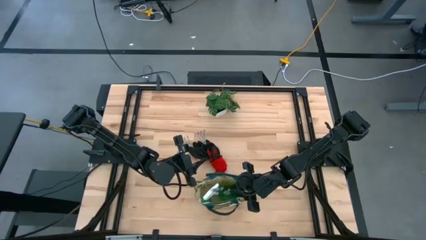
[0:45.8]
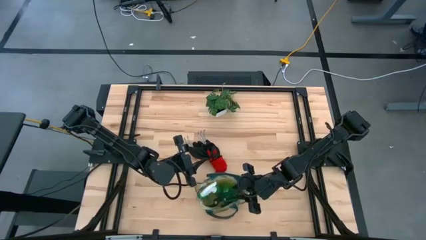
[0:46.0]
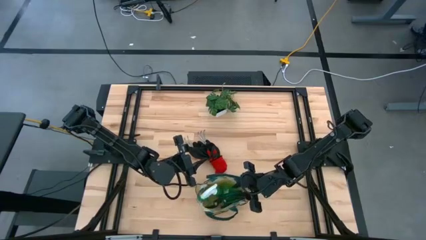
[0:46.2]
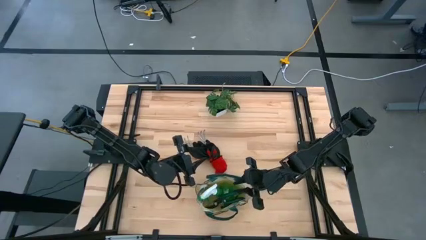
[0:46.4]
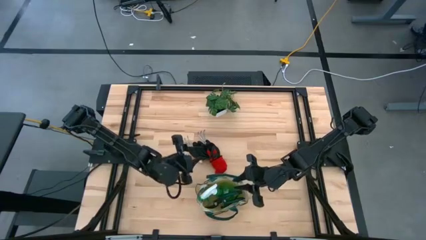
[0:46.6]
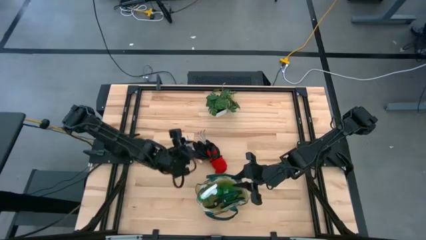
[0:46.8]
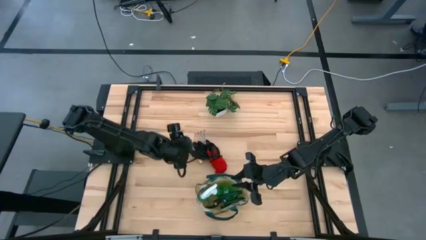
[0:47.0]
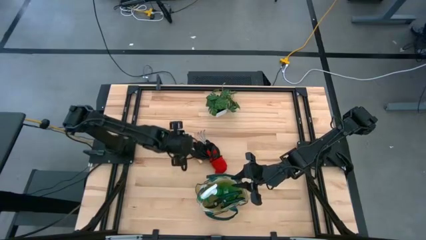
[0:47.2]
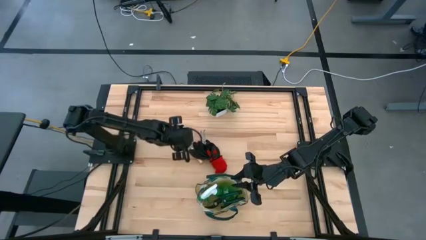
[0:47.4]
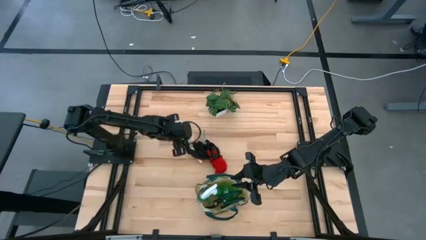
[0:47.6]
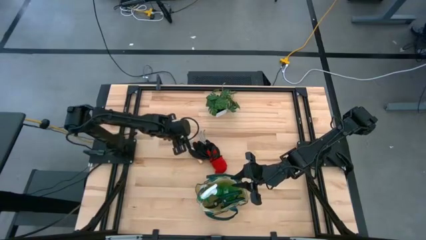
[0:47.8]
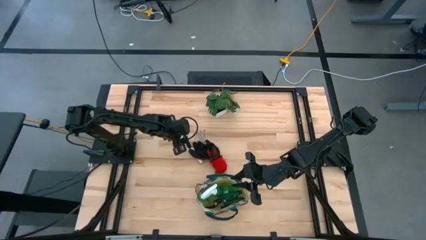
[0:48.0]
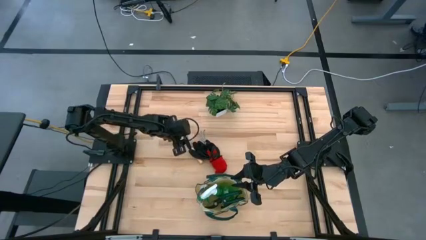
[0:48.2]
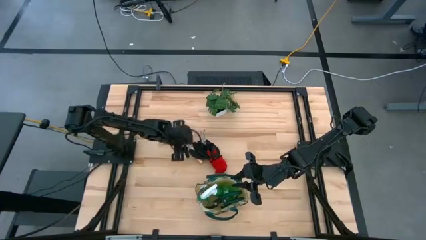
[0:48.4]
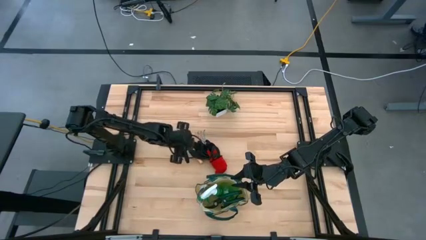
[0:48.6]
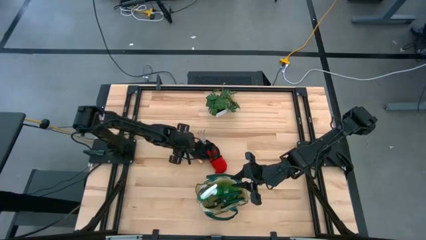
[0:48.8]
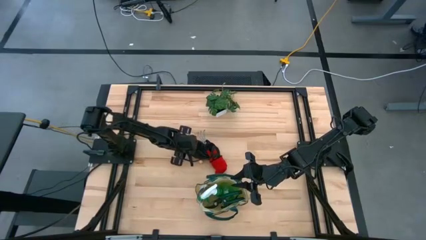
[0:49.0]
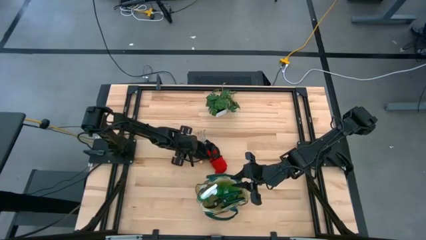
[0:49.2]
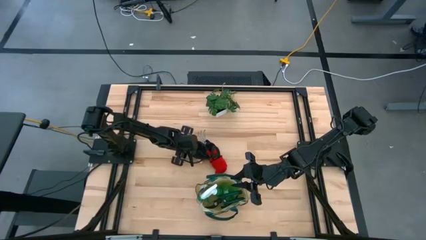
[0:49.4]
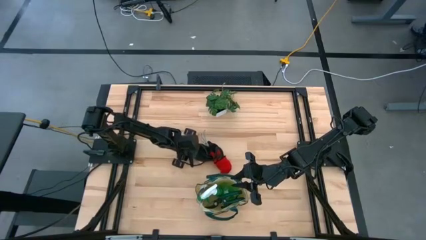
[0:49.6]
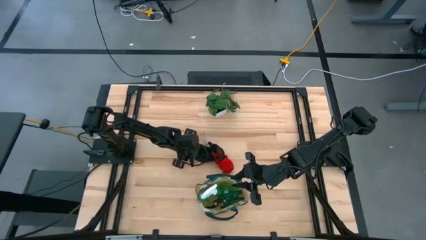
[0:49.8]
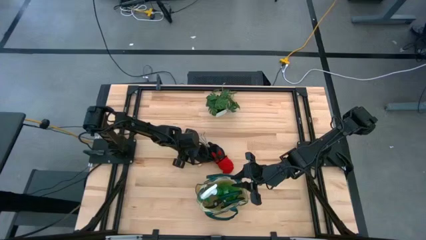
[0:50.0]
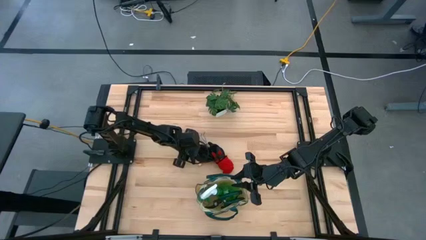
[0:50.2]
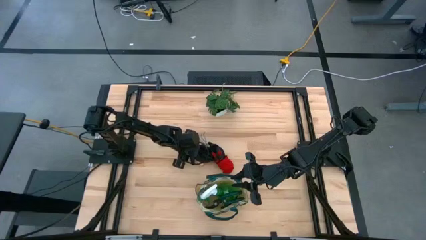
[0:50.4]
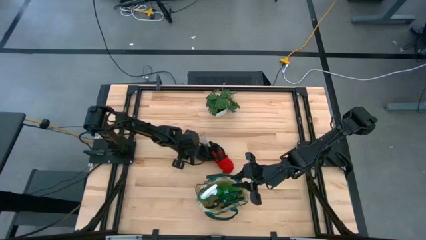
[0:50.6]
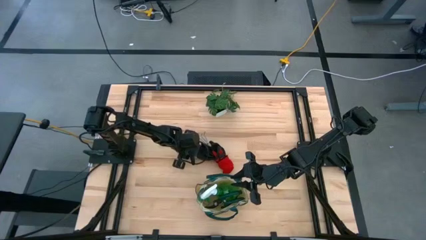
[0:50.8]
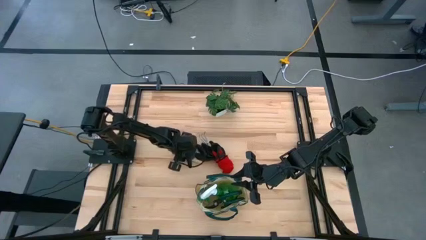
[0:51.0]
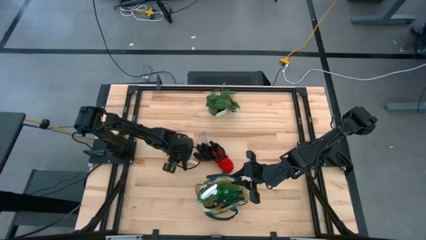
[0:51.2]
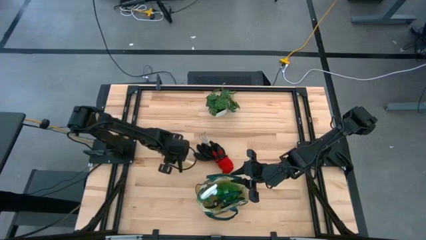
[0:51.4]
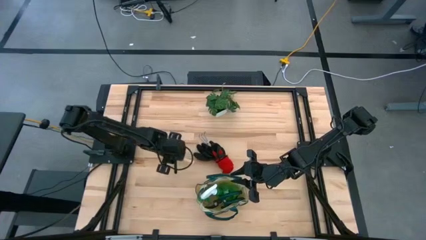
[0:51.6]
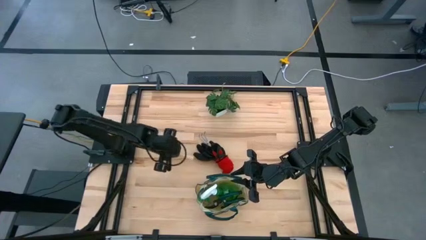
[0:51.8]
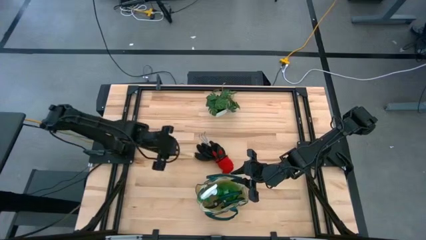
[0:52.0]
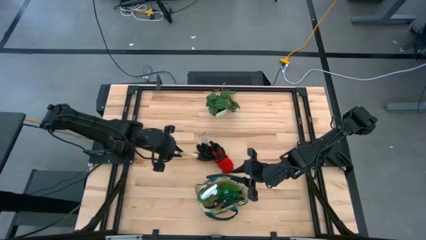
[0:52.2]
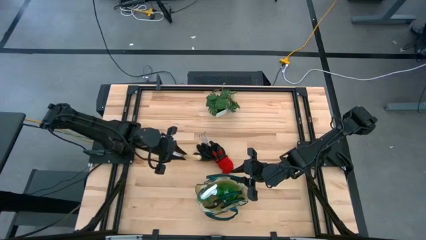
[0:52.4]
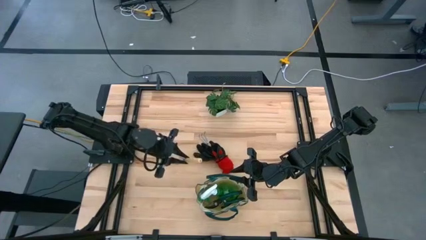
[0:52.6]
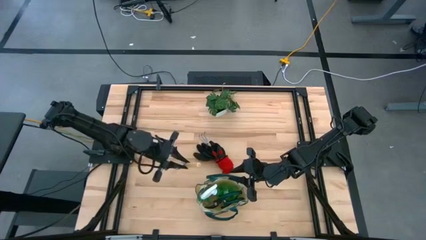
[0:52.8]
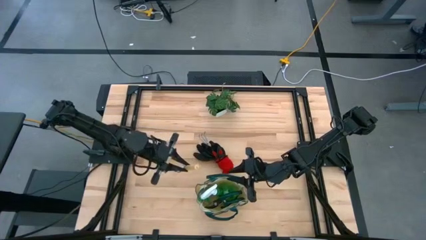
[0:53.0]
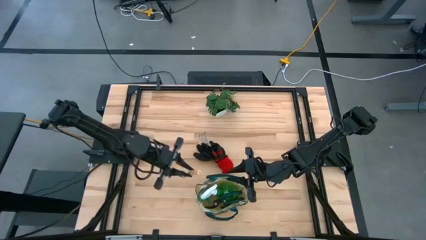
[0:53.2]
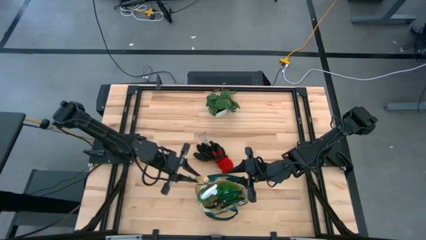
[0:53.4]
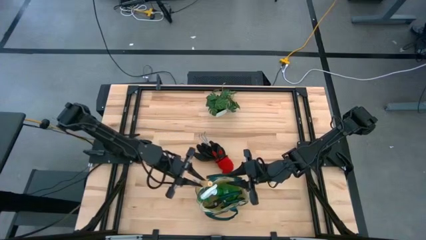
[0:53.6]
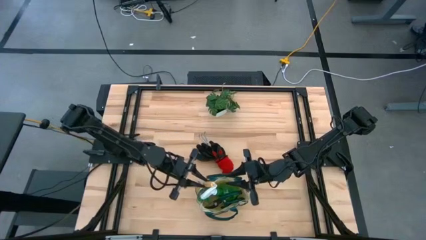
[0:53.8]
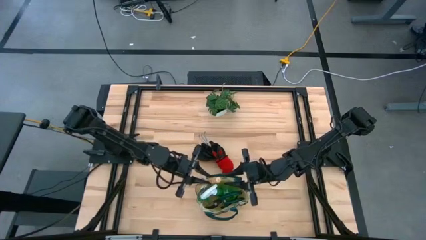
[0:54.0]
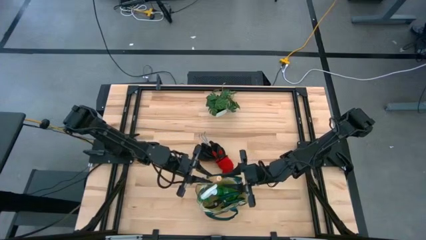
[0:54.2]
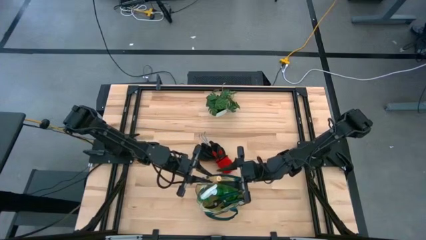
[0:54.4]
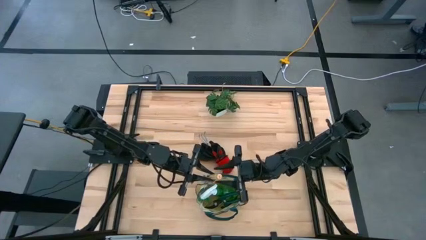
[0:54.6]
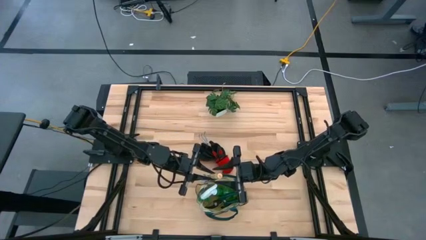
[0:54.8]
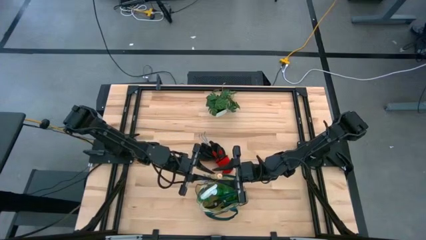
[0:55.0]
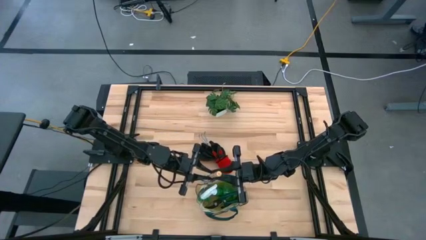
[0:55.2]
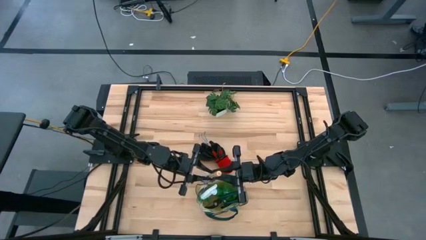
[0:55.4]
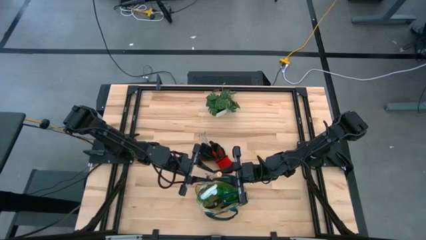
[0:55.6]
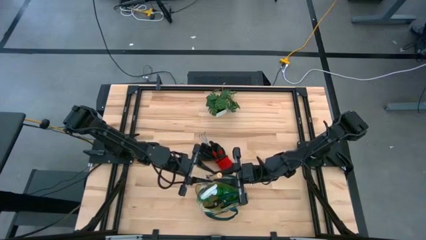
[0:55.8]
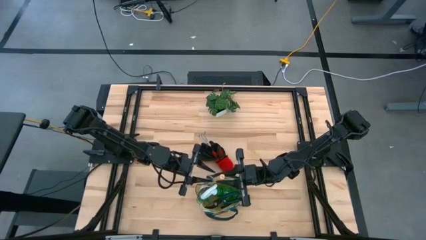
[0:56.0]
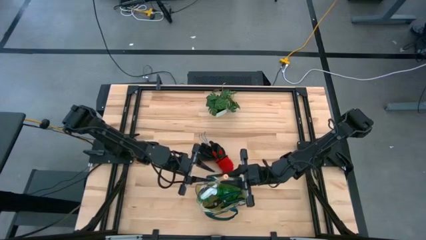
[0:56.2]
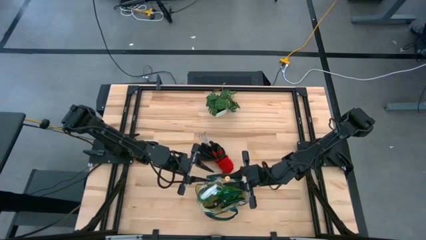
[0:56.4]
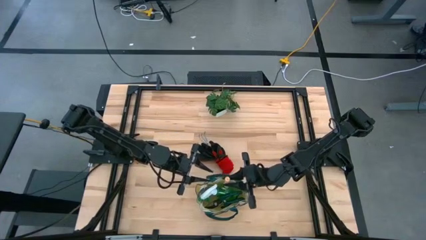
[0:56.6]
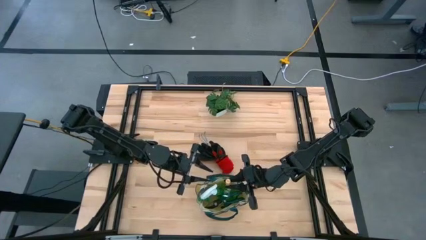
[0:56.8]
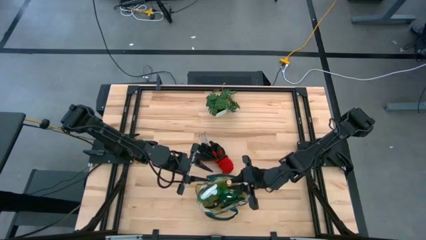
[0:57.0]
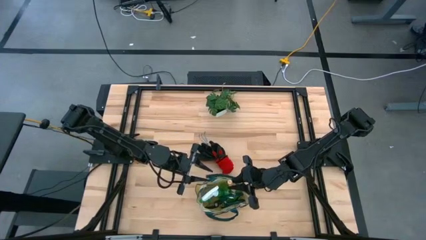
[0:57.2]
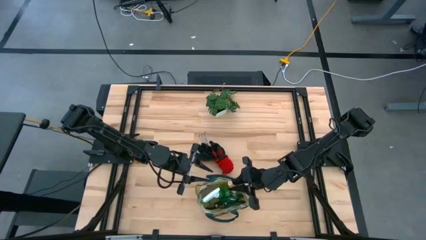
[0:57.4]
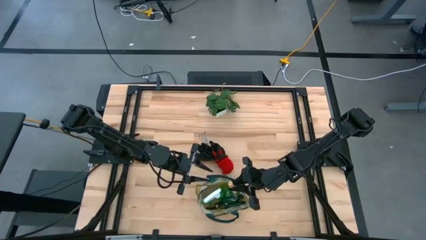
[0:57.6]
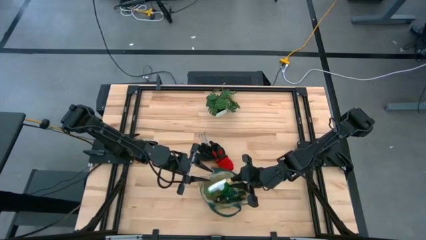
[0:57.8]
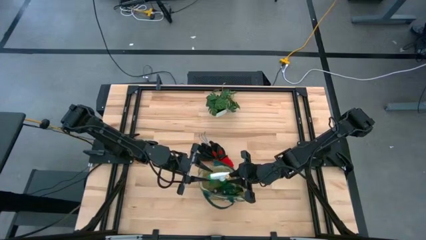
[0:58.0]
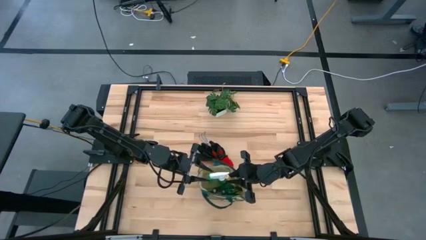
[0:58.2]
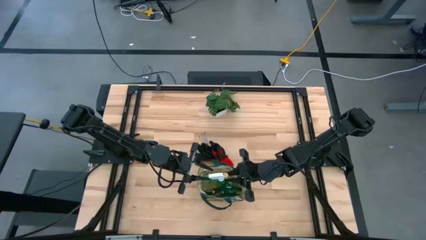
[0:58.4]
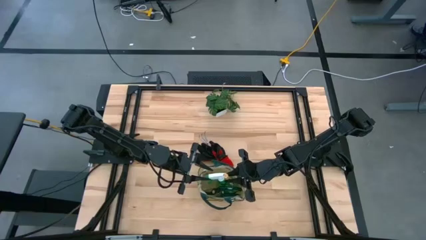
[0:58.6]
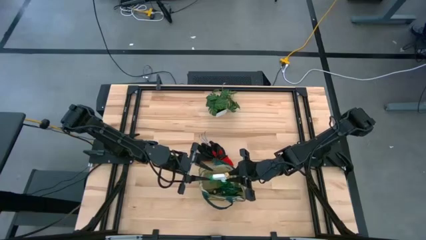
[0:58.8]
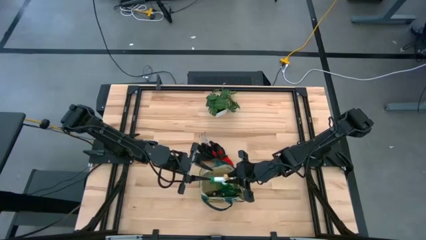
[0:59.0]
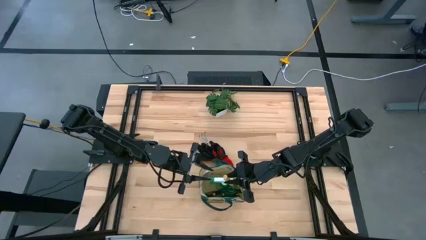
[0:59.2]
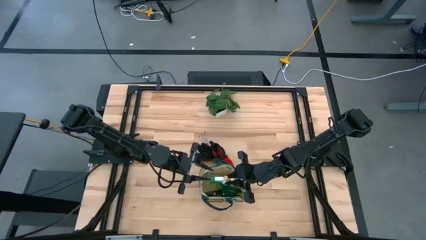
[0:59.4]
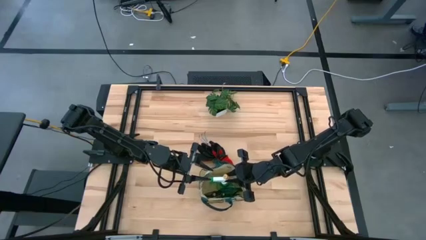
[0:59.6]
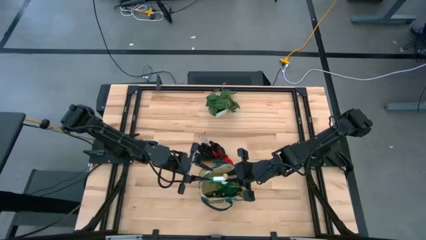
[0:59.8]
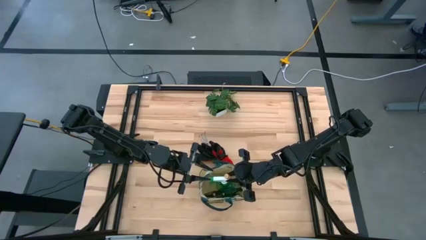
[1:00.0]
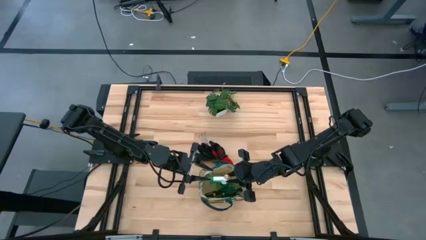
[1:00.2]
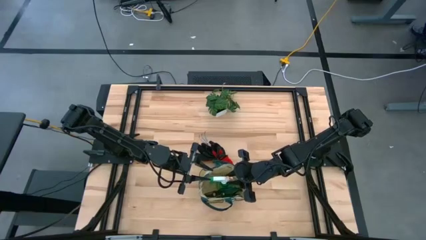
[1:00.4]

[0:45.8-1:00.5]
Task: Pick & Place Garden tools in Gardening bag
Put the left brown hand rake into the gray gardening bag

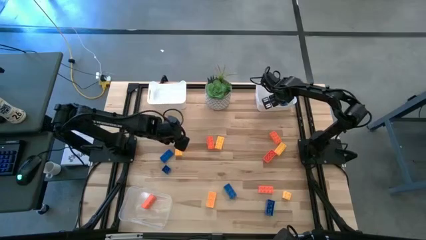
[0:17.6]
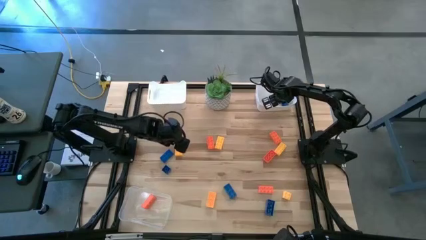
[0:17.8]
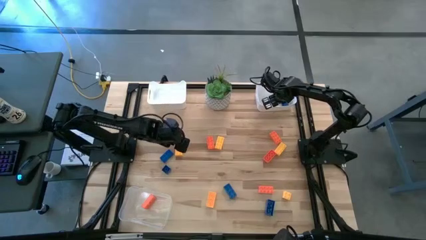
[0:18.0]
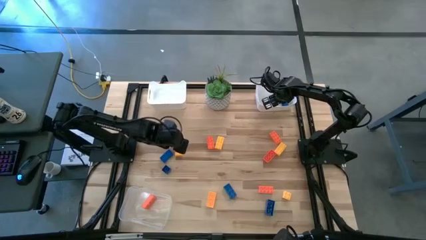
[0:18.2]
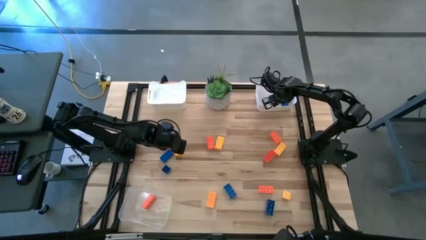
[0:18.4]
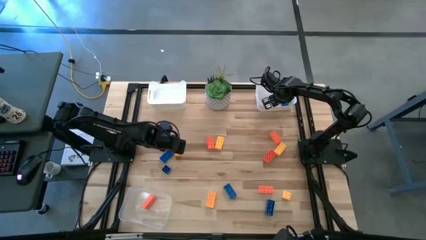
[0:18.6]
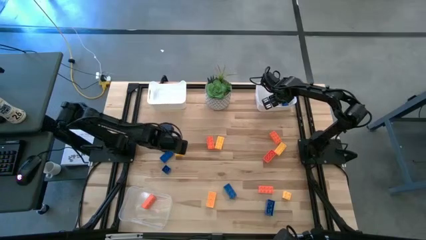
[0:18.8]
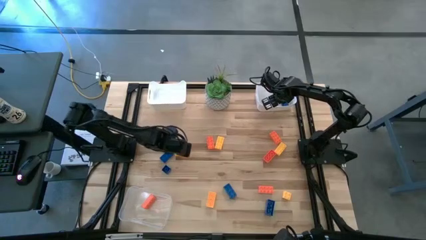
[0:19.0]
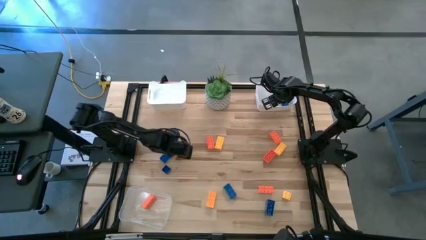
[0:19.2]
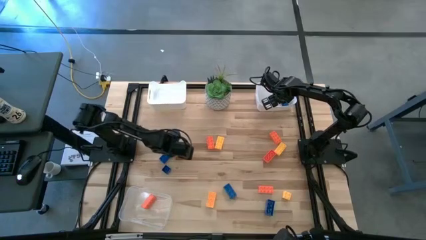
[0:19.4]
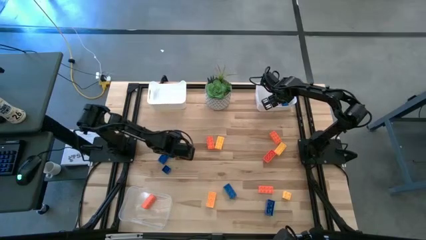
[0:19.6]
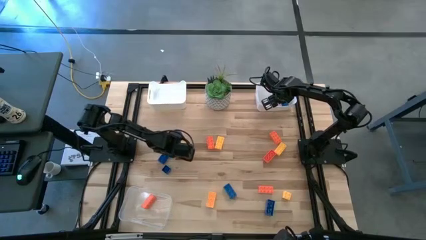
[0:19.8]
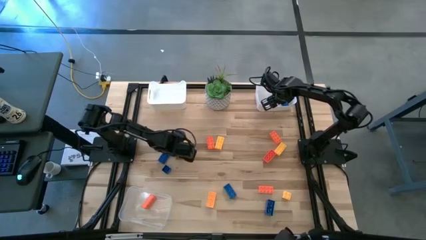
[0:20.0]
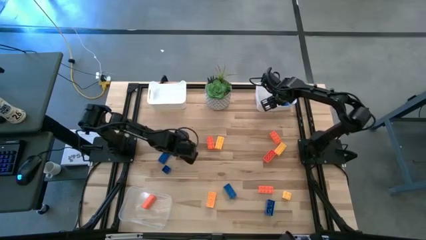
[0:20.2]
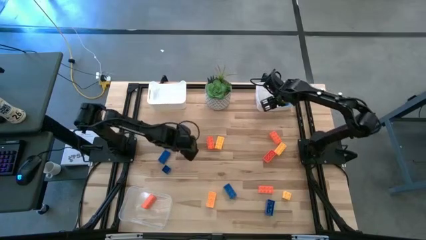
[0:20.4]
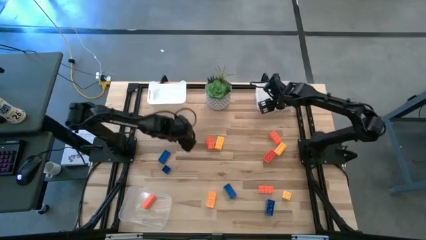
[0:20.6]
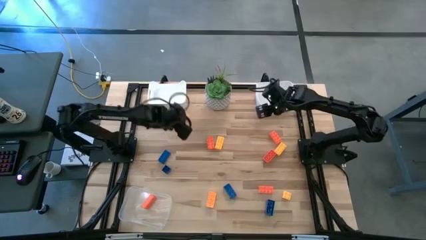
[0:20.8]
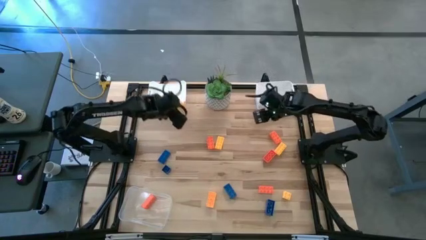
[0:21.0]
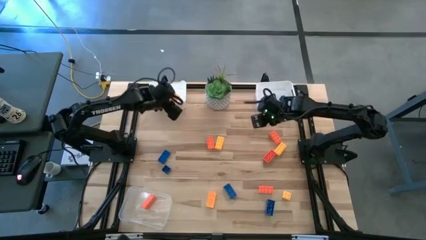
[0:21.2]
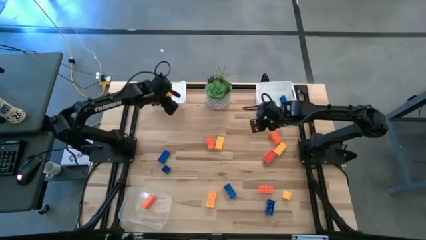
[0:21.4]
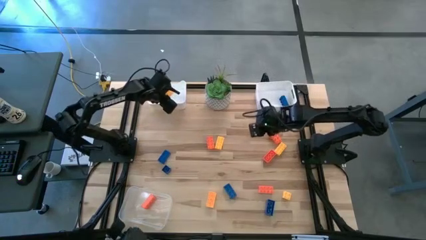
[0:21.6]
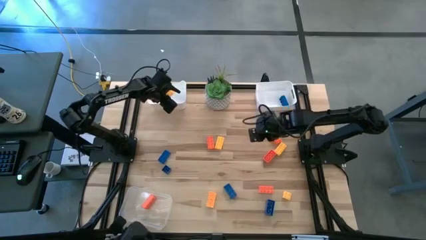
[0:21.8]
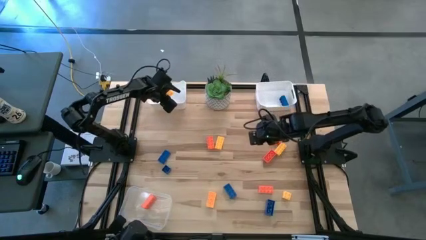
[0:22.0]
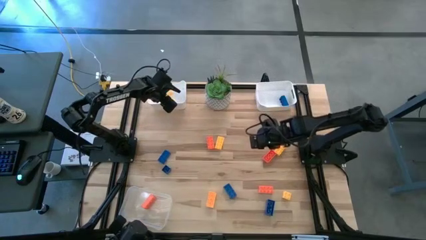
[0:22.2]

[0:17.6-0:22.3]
Task: Sort & place blocks by color
Put the yellow game piece into the left white bin
